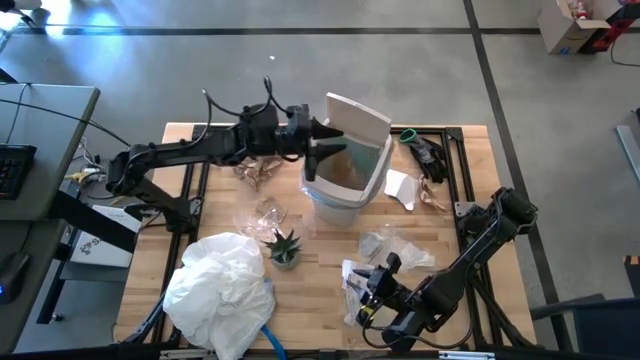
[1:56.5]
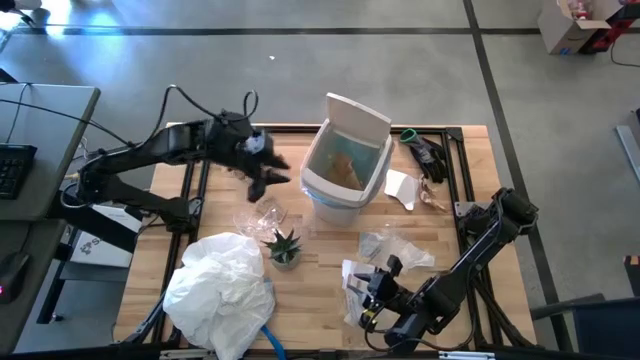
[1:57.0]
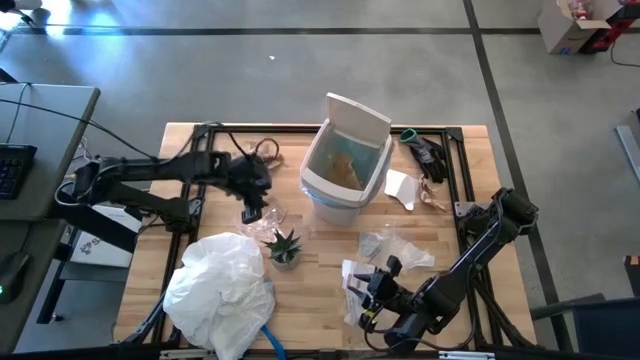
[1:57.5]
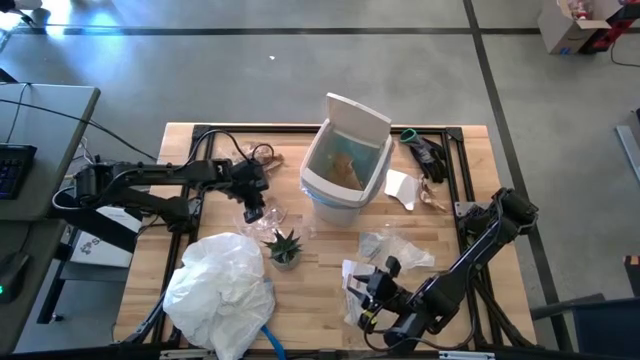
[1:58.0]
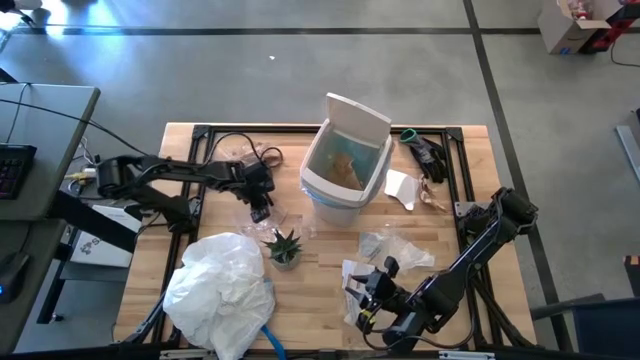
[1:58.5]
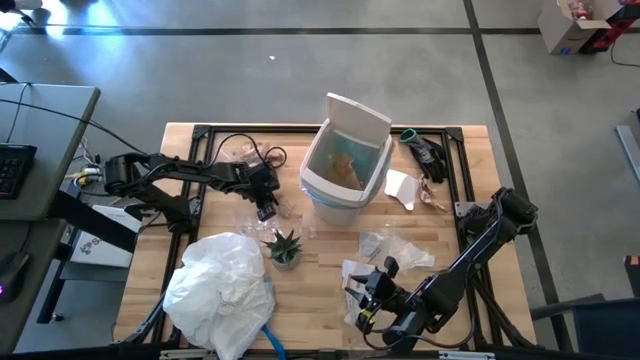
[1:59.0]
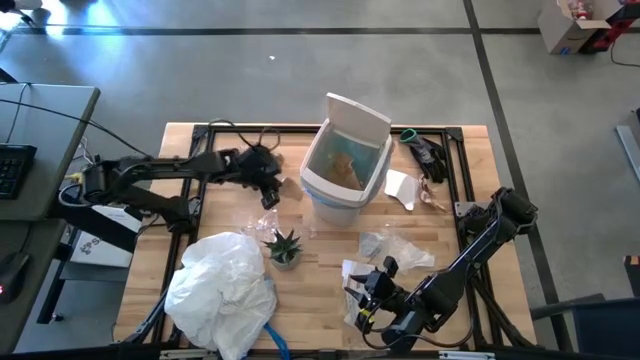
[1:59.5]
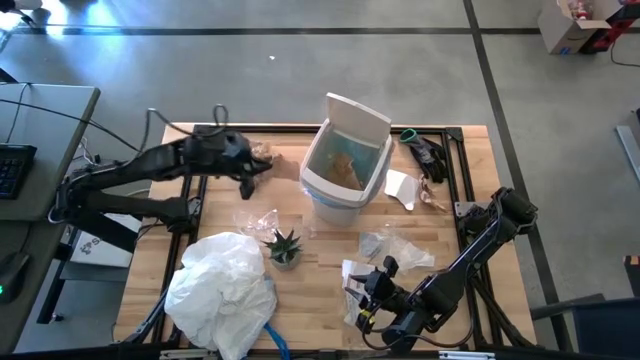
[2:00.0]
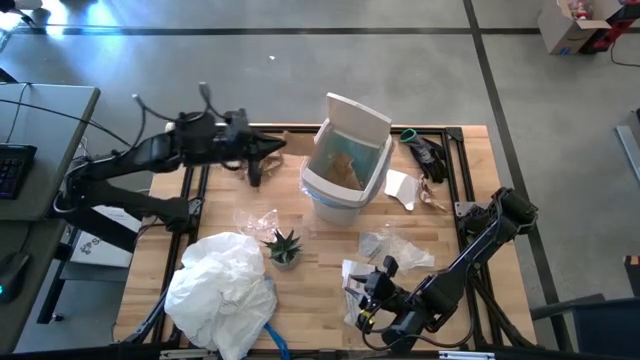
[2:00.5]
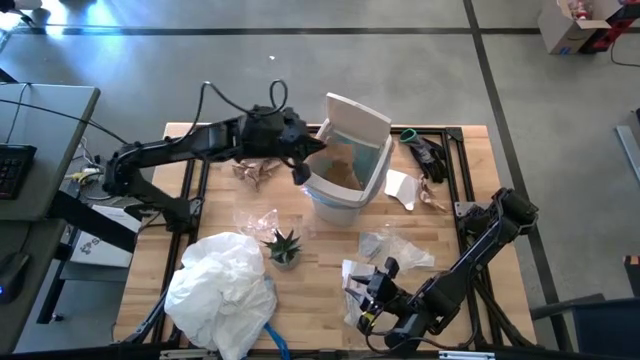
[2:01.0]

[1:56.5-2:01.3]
Task: place trash/remove bag and relplace
Put the brown napkin into the trash bin

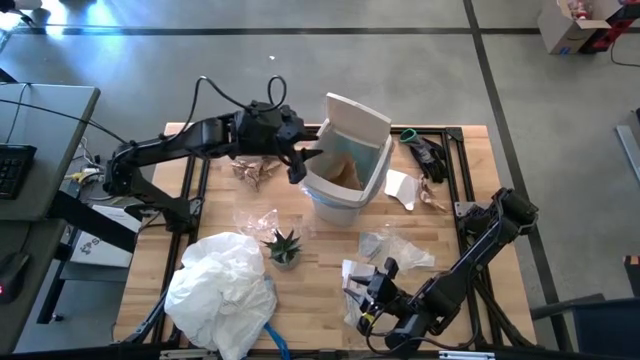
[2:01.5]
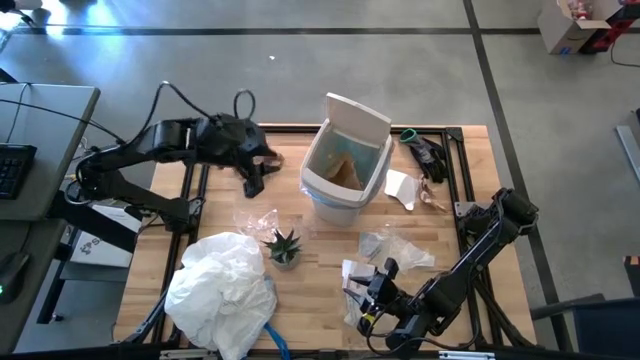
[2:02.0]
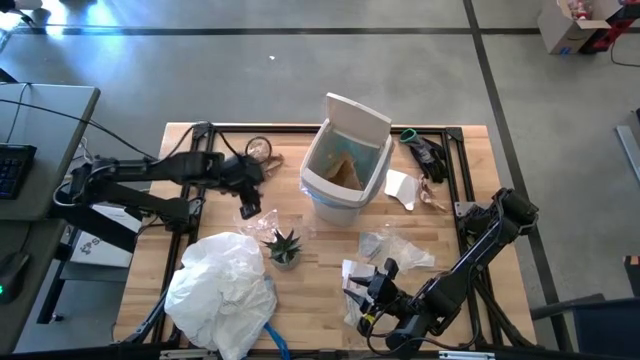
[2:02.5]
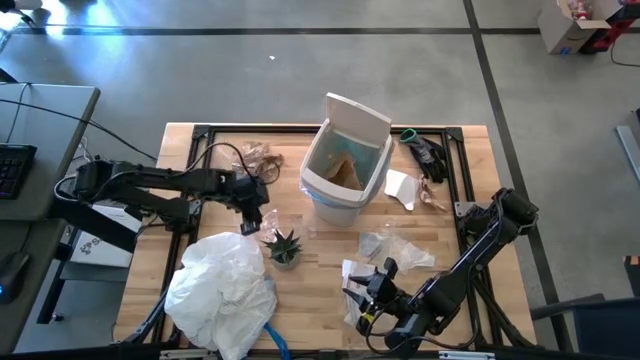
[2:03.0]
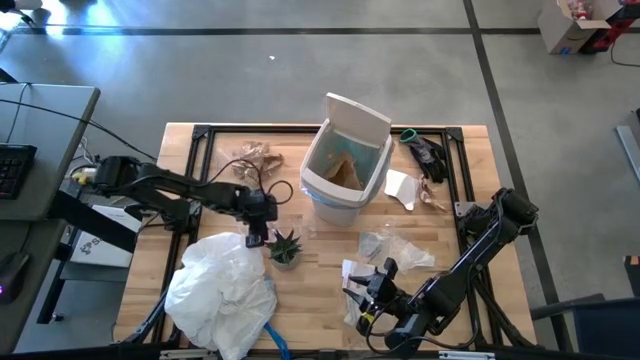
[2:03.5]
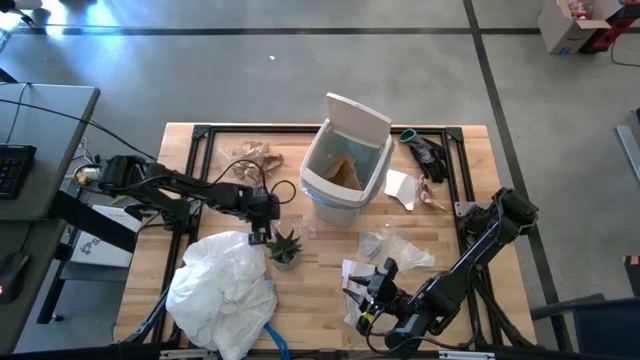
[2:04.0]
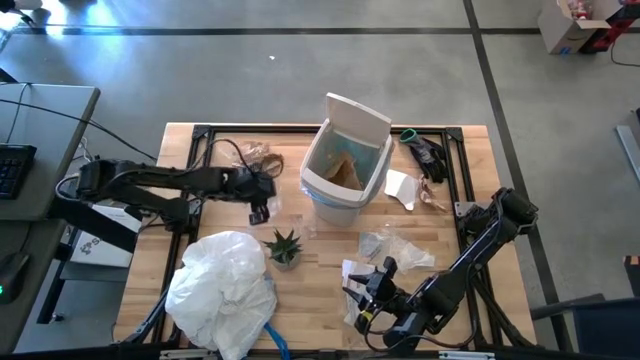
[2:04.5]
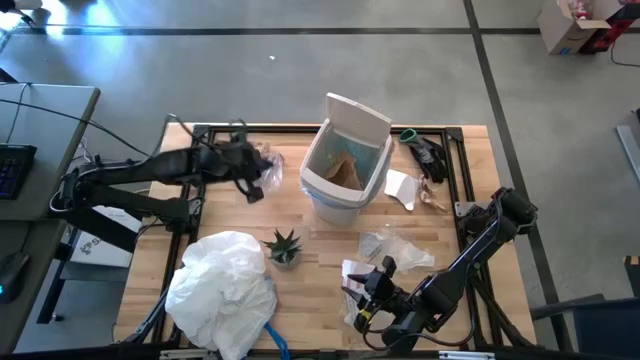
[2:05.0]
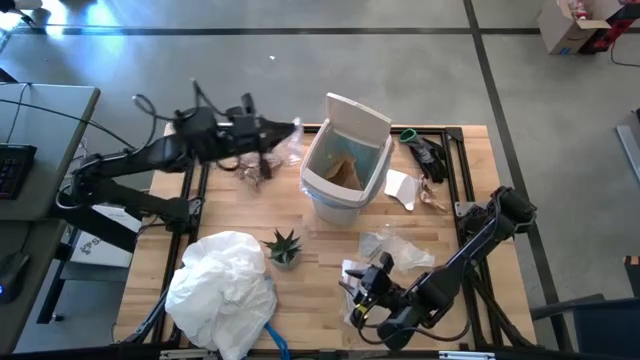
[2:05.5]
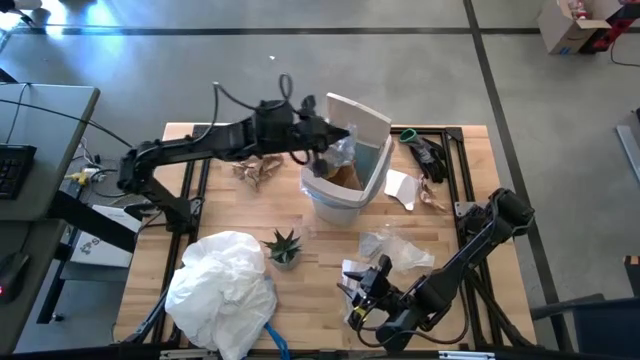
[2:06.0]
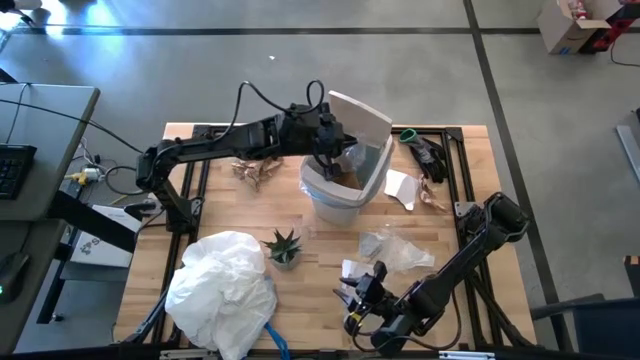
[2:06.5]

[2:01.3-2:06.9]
Put the transparent plastic into the trash bin

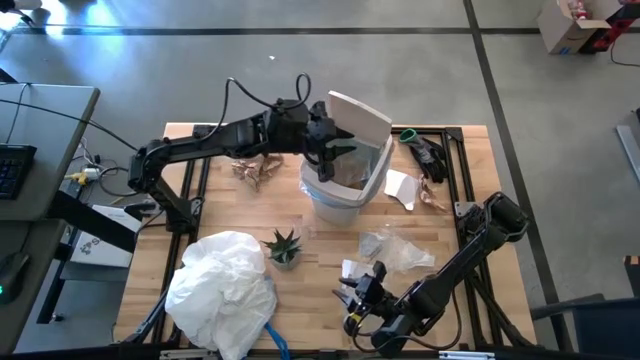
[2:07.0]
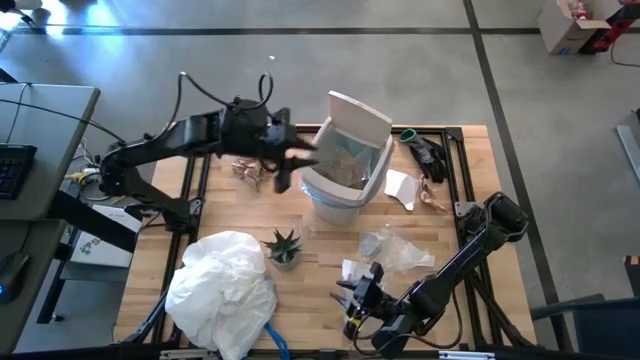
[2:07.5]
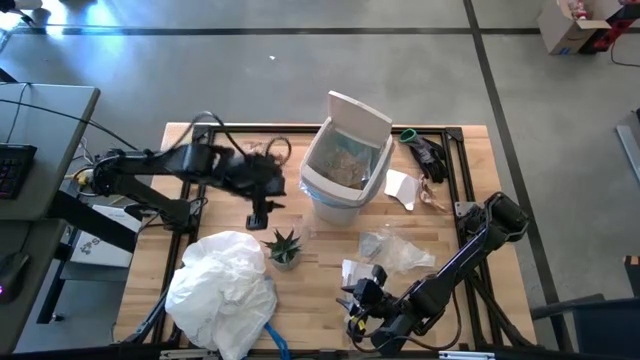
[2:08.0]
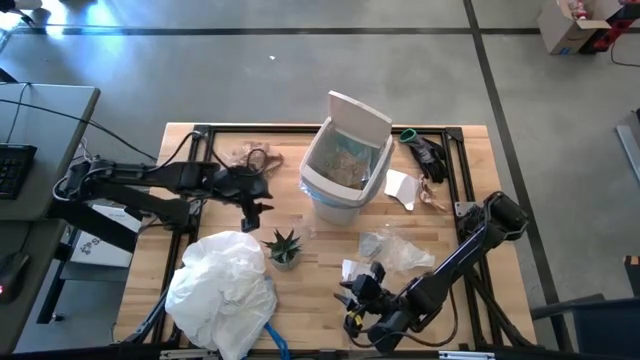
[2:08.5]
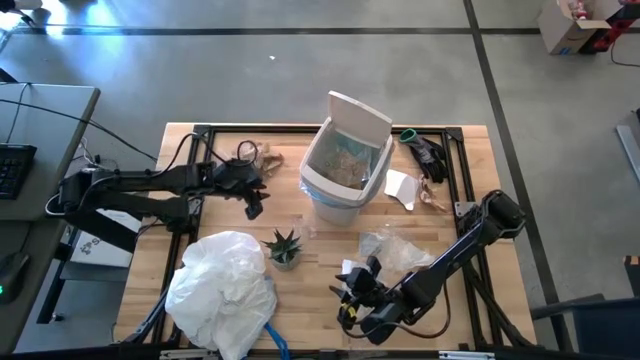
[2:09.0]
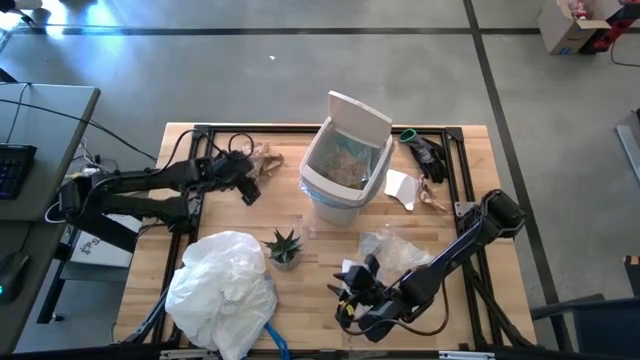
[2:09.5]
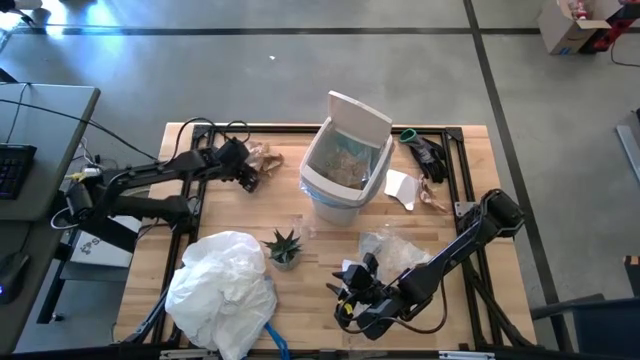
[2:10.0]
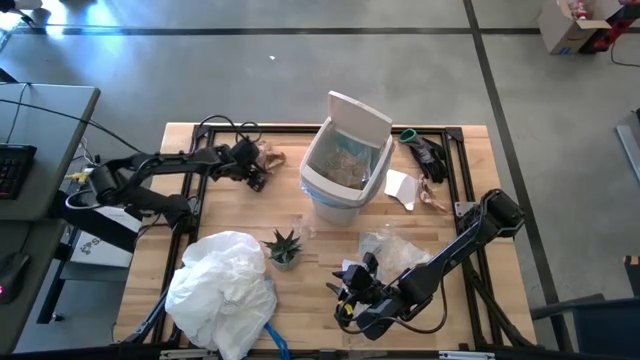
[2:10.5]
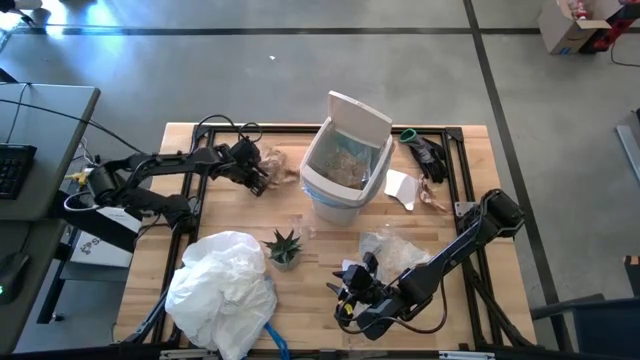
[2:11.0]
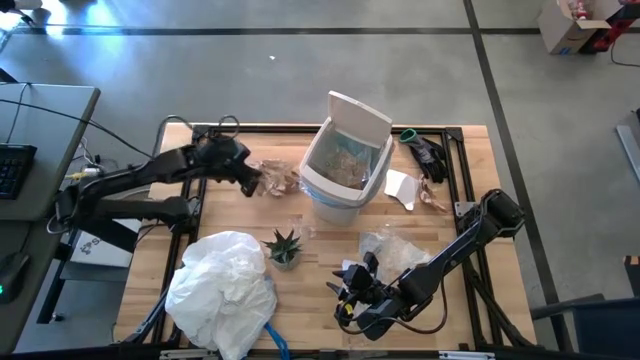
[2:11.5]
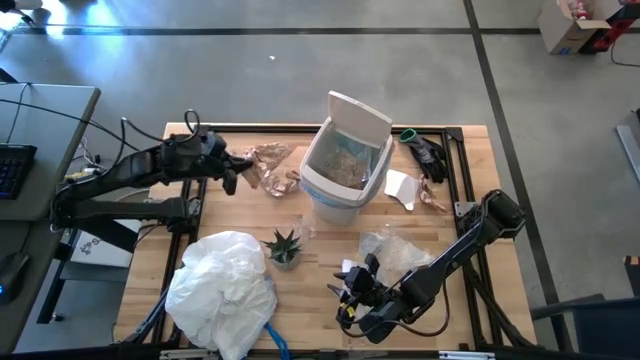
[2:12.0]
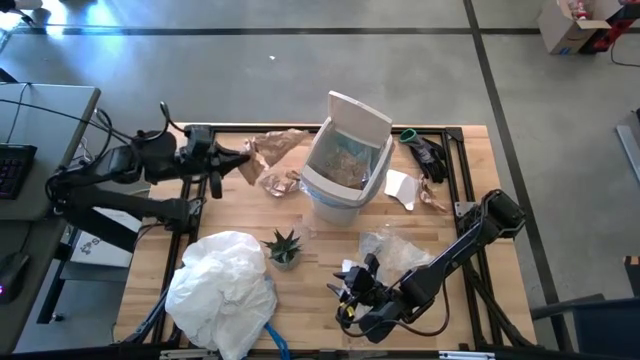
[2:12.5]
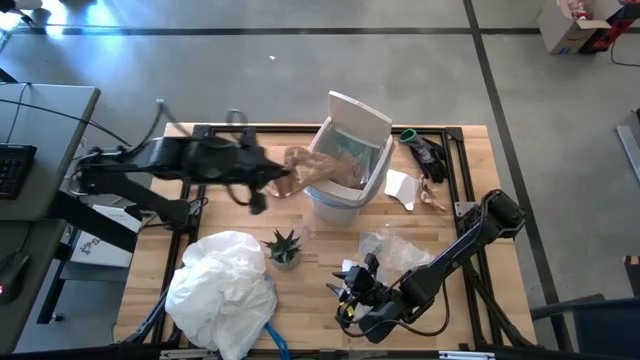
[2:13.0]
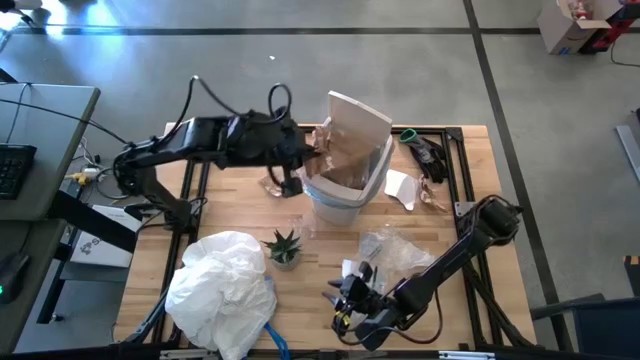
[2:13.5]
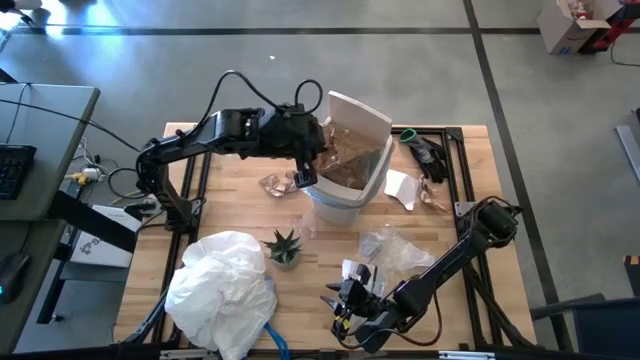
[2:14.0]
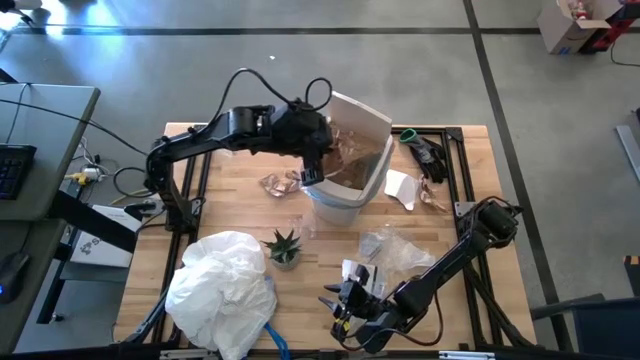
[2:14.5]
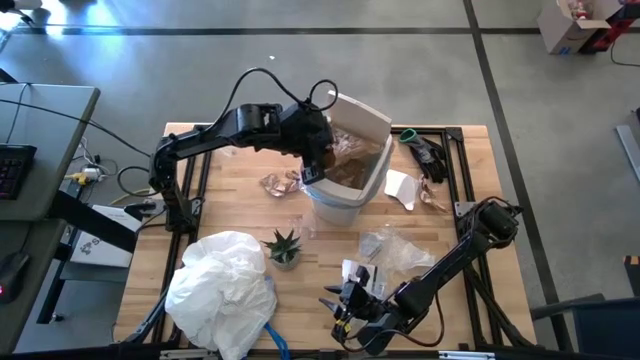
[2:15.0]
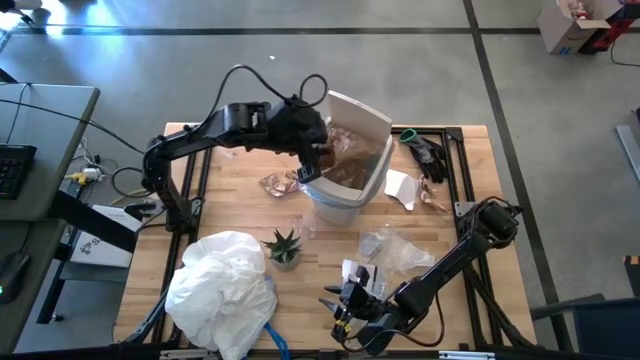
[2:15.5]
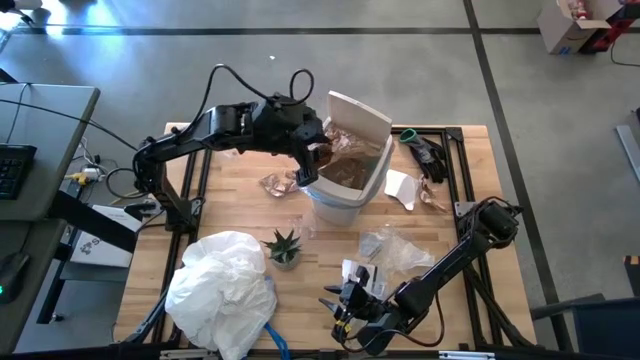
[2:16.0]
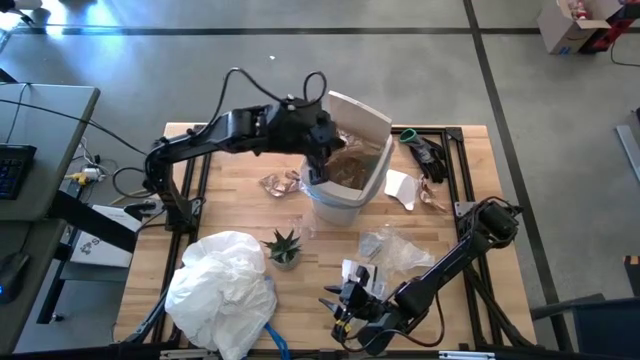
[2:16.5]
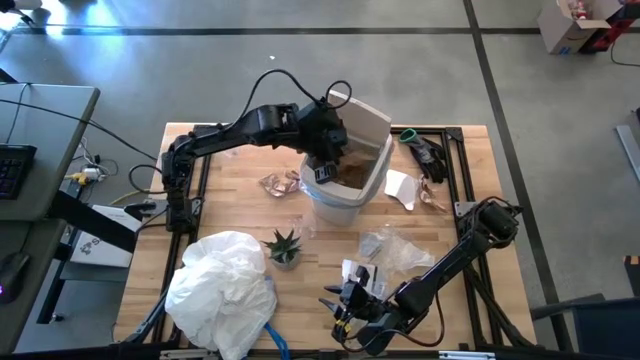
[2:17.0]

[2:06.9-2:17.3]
Put the brown napkin into the trash bin

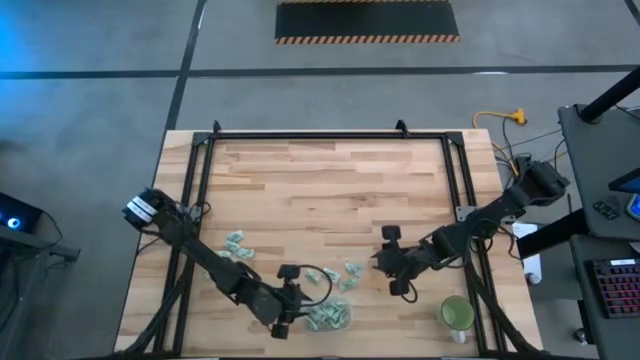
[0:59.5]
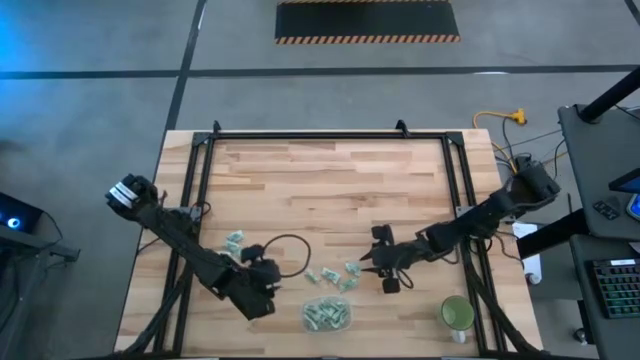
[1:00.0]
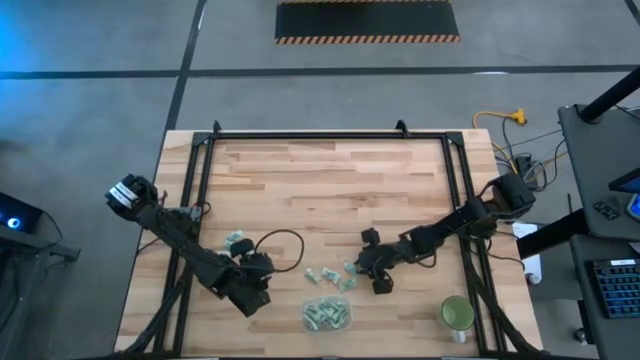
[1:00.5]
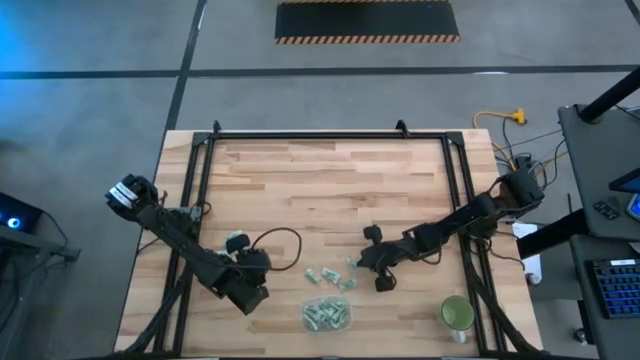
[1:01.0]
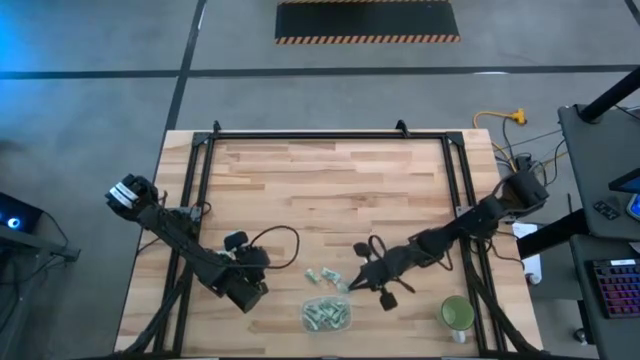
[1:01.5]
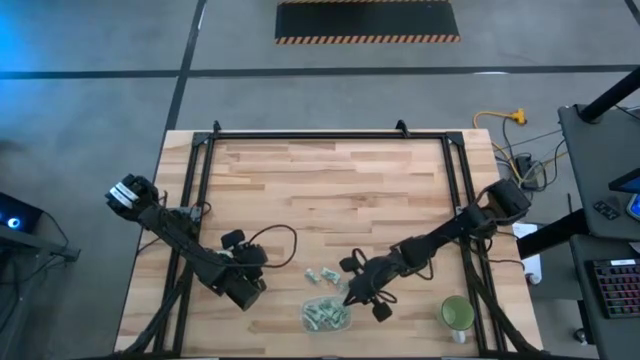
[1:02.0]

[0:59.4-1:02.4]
Task: Pick and place Stevia / Truvia into bins
Put the stevia packet into the transparent container
